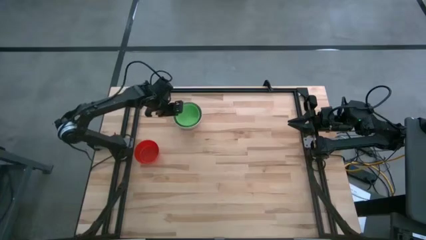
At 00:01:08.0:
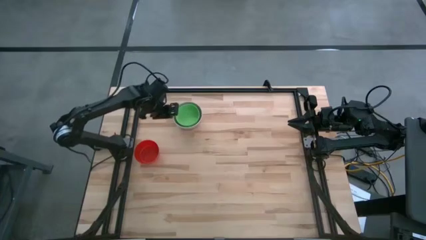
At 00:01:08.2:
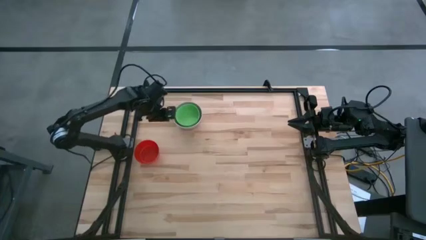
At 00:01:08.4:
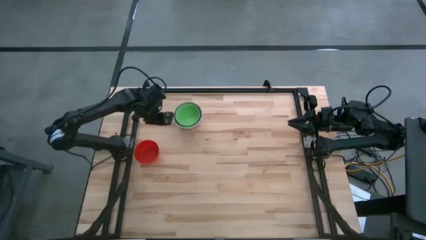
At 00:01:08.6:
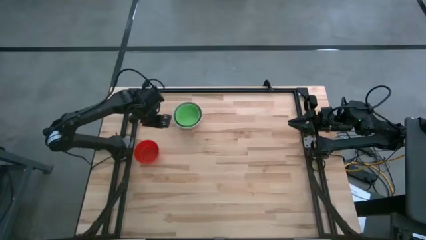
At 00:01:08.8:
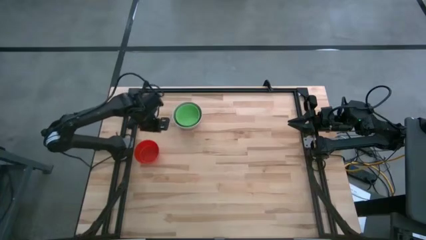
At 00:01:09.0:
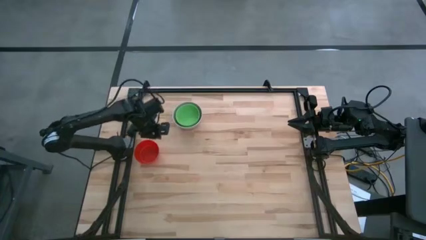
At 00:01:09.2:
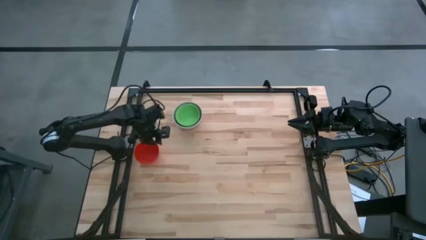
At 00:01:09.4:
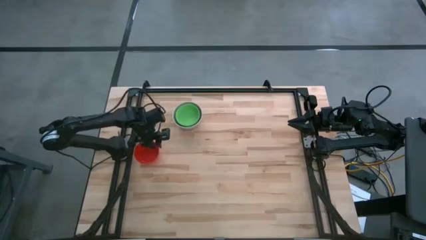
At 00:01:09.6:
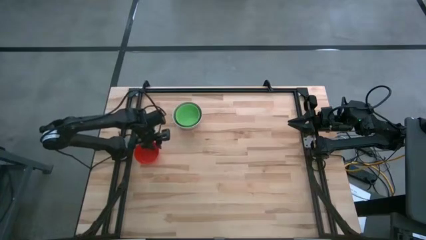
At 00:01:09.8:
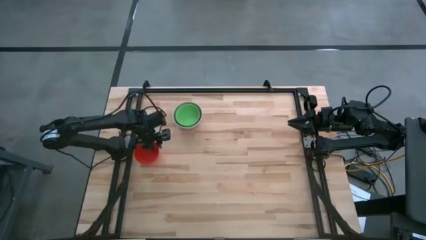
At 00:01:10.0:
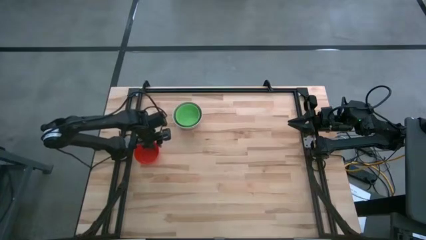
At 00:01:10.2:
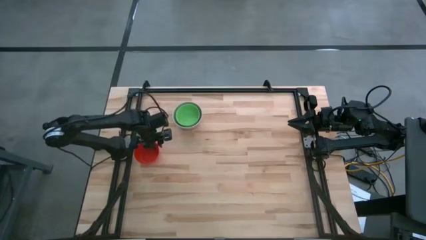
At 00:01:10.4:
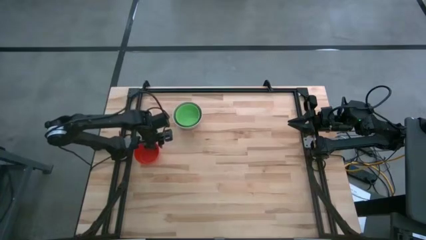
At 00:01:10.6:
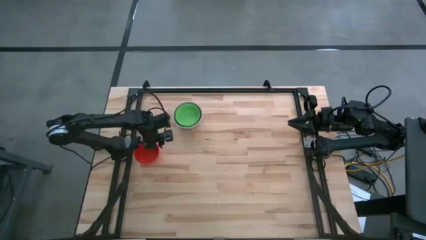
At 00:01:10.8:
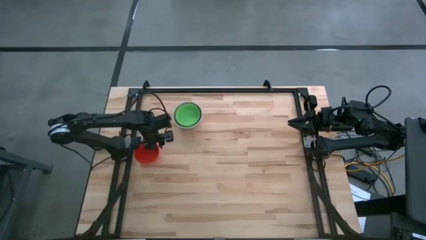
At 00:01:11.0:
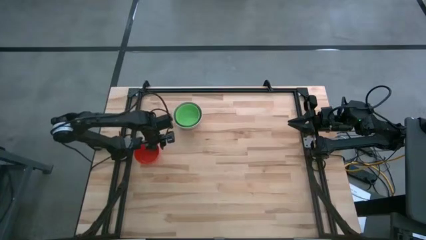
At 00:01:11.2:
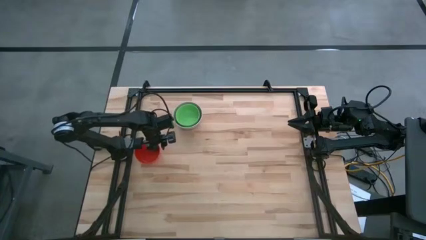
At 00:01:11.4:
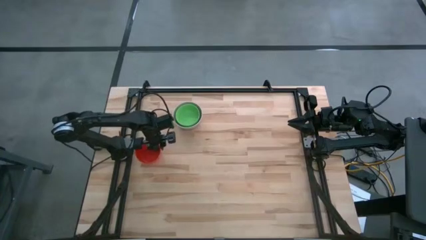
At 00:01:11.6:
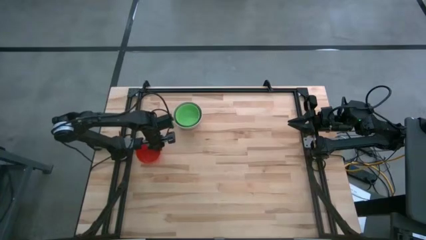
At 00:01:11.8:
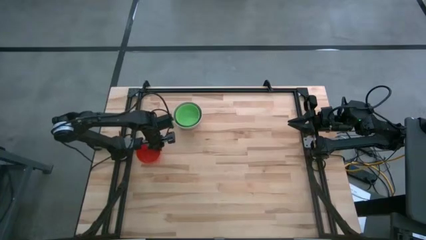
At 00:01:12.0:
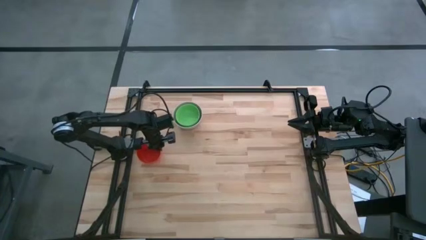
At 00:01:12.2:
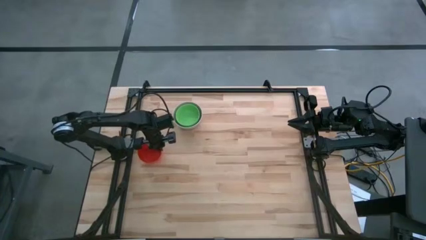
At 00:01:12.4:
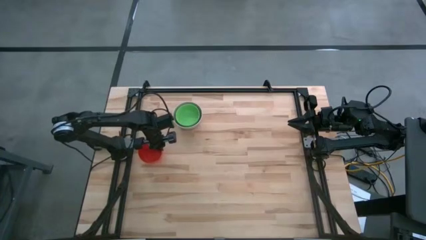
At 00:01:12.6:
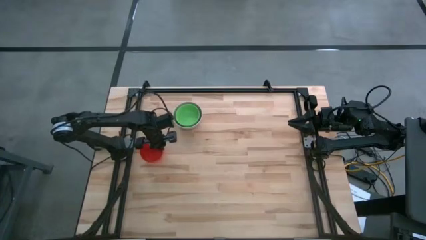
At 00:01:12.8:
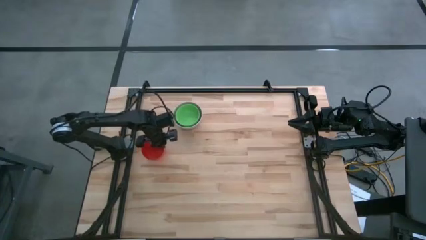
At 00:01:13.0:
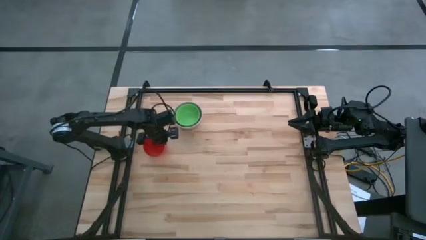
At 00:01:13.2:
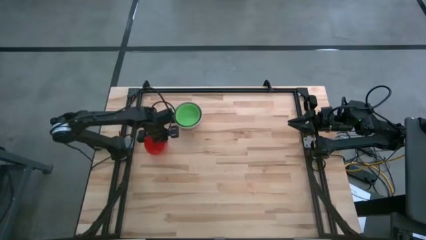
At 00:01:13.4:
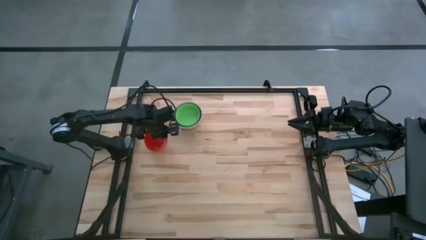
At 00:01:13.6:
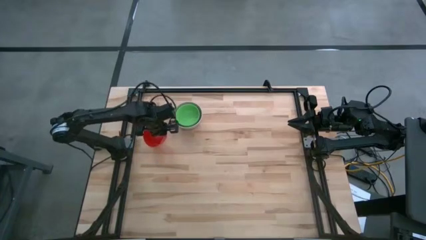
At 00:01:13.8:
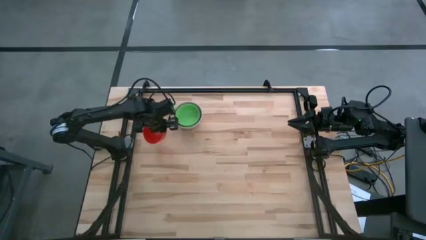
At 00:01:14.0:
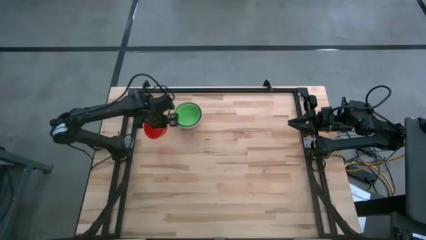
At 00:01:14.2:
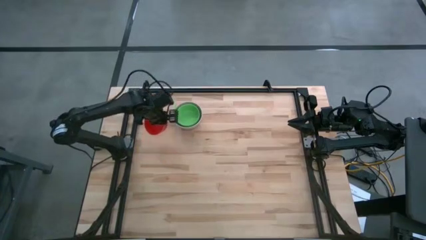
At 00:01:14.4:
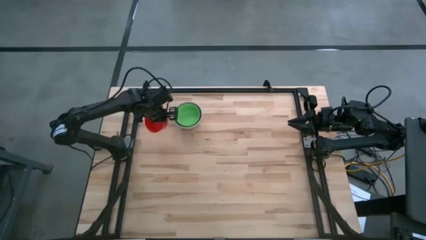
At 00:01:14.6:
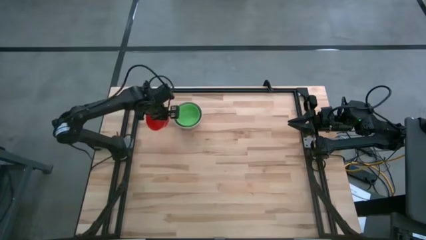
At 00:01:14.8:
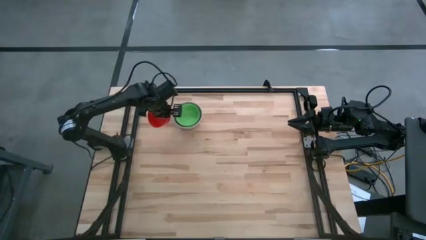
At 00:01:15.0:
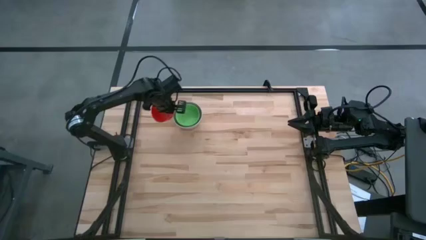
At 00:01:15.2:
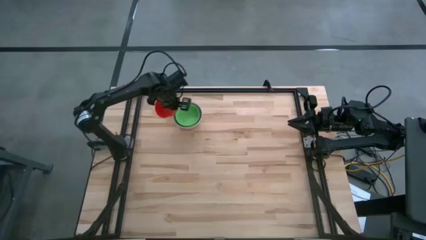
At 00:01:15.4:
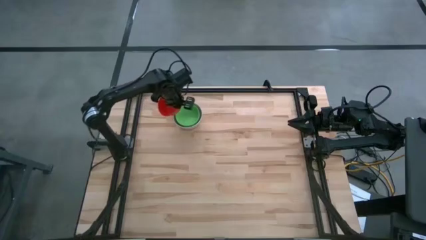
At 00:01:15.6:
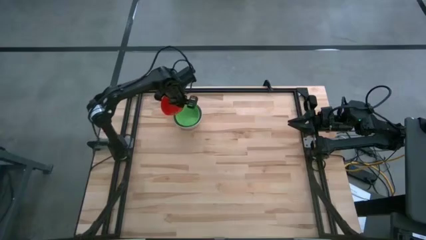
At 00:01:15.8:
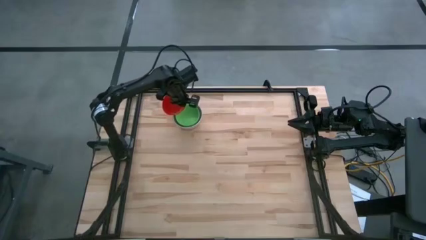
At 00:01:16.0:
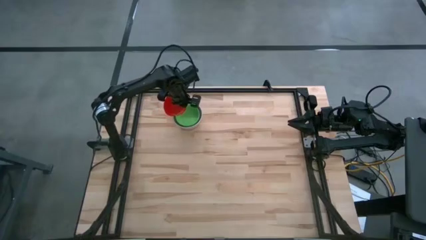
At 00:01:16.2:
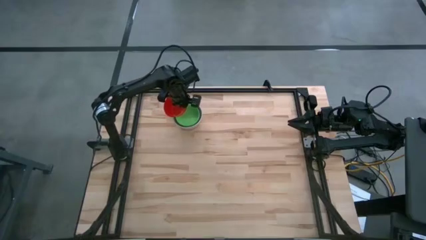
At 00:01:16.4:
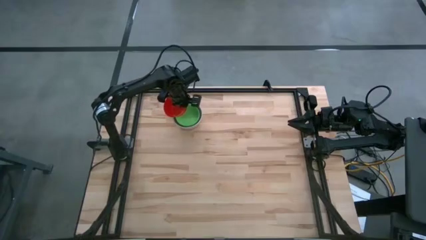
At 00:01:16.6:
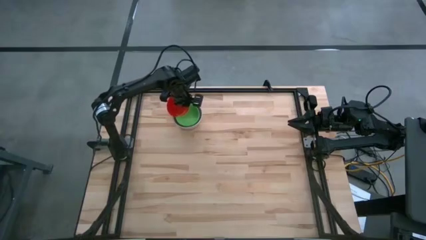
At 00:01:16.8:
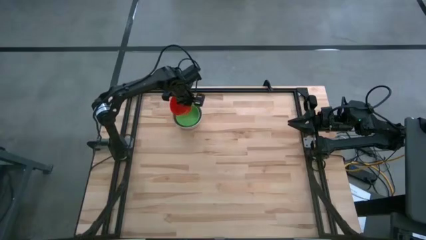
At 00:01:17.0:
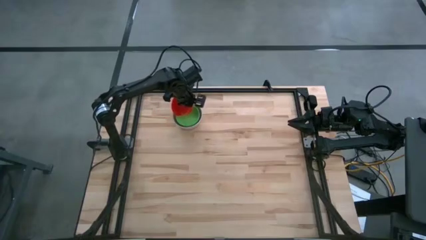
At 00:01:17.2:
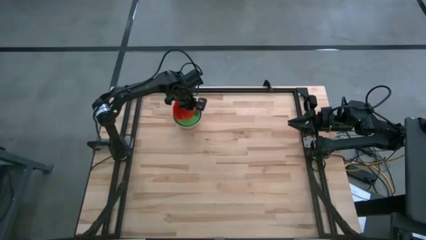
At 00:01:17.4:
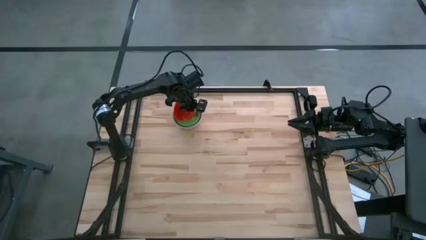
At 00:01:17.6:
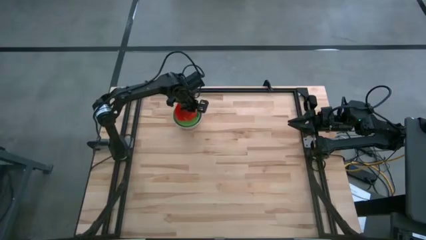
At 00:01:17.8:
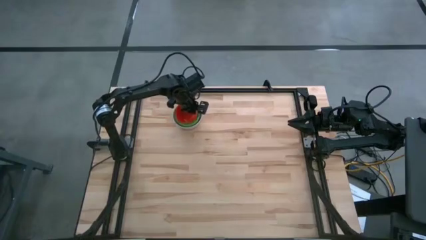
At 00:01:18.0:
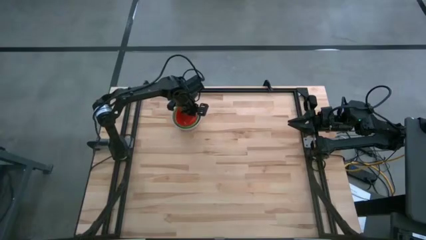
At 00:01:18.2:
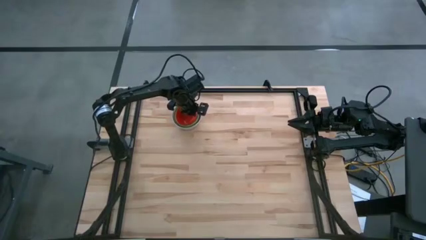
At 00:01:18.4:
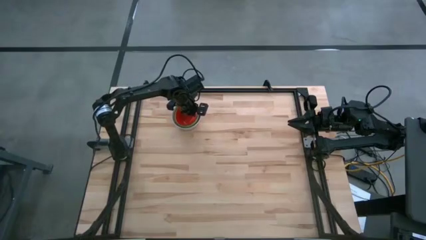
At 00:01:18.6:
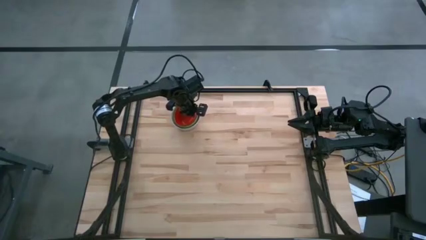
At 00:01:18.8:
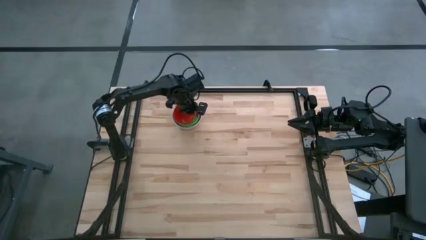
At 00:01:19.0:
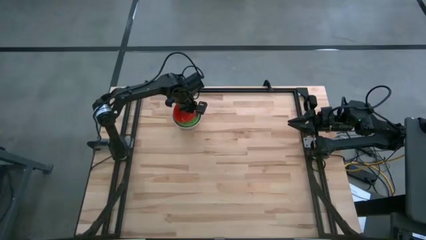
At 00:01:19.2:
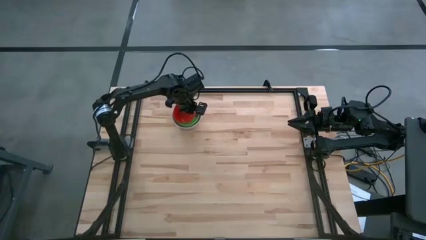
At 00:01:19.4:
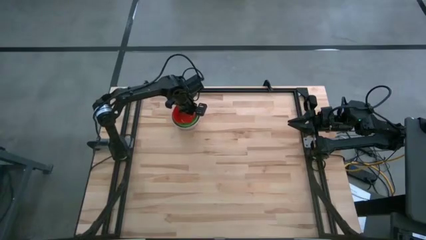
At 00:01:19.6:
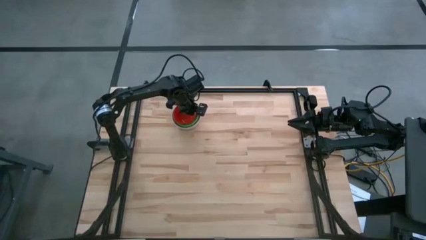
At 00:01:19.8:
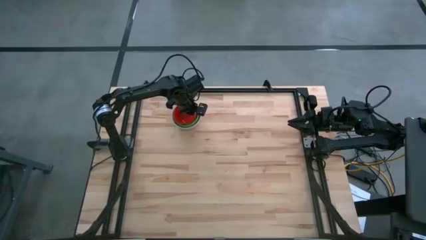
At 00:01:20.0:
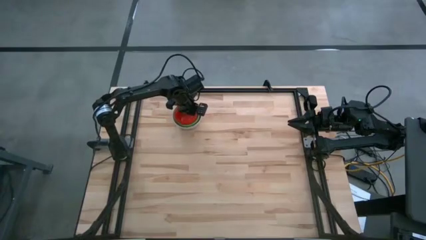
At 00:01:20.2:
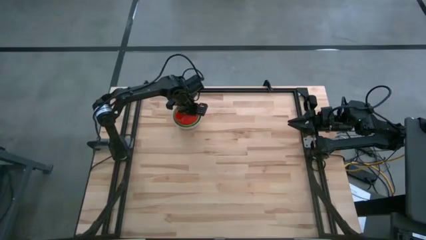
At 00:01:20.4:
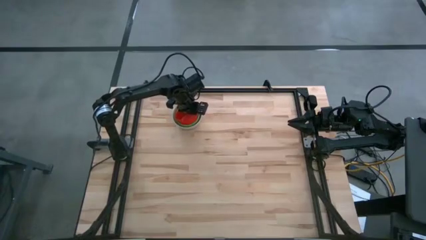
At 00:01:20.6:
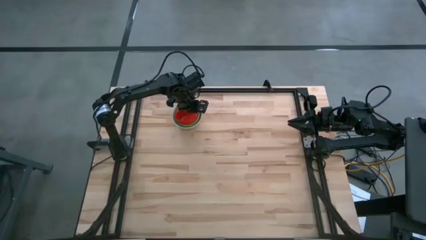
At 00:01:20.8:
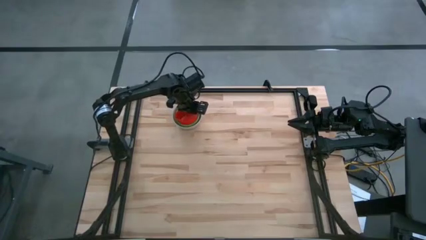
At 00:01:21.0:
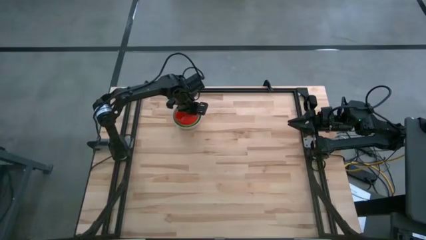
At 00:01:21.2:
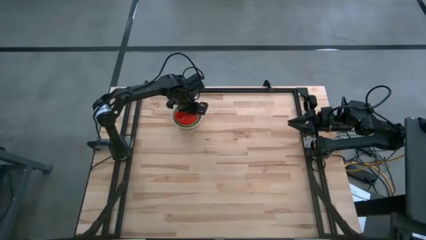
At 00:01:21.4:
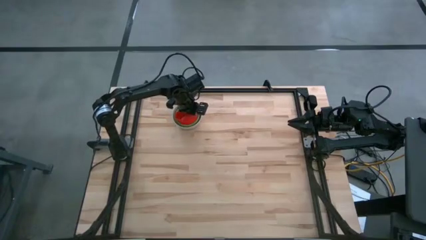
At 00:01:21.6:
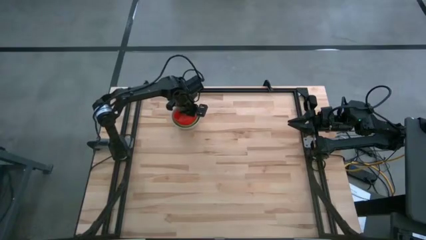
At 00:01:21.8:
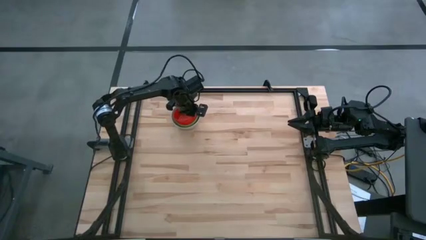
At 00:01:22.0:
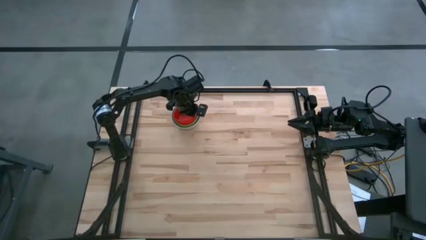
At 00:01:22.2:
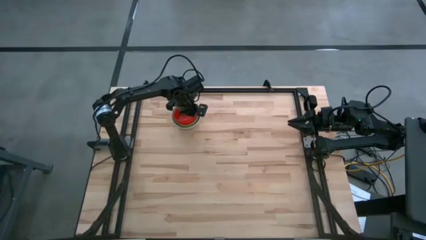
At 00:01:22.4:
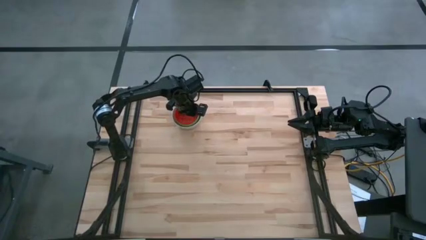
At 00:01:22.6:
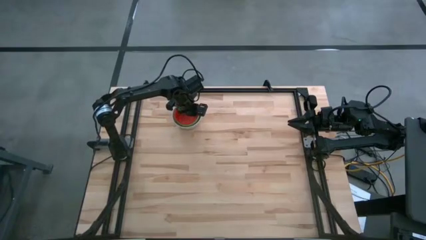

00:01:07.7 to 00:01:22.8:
Stack the red bowl on the green bowl
